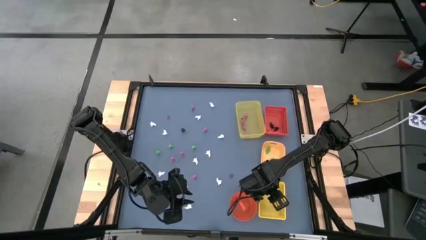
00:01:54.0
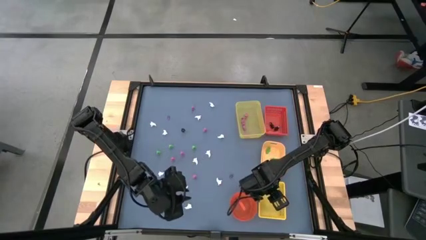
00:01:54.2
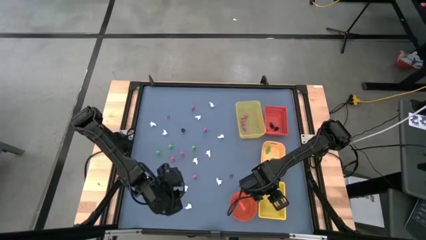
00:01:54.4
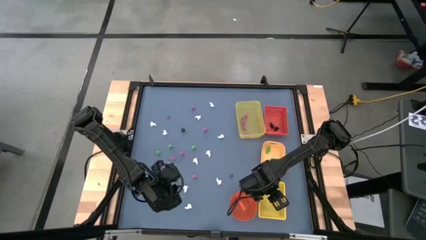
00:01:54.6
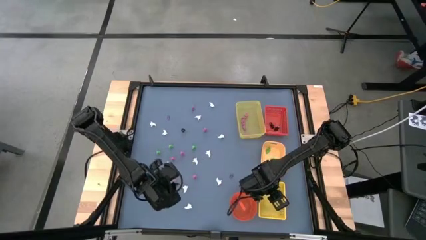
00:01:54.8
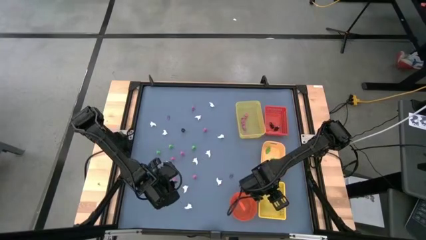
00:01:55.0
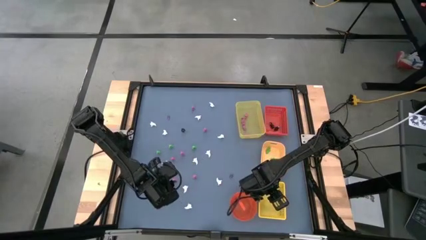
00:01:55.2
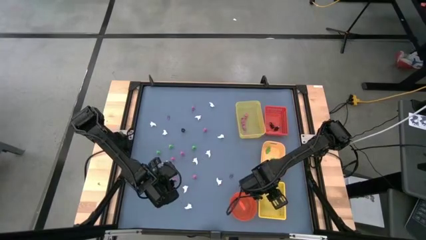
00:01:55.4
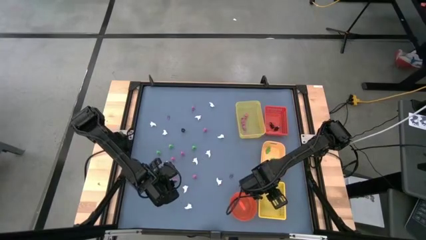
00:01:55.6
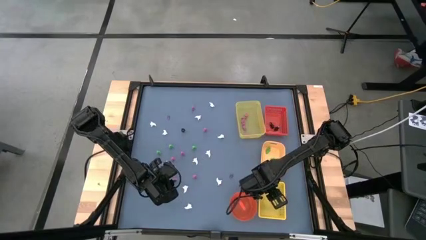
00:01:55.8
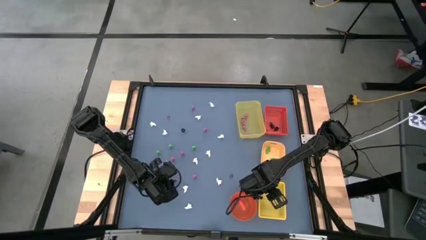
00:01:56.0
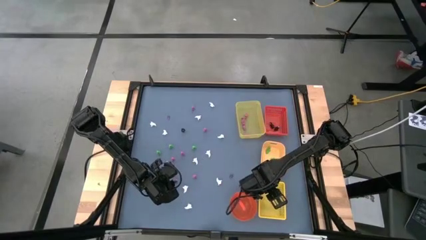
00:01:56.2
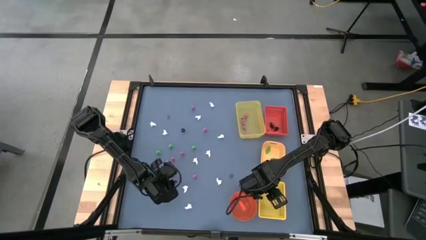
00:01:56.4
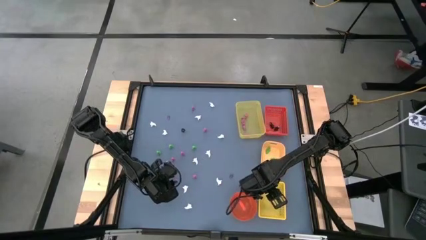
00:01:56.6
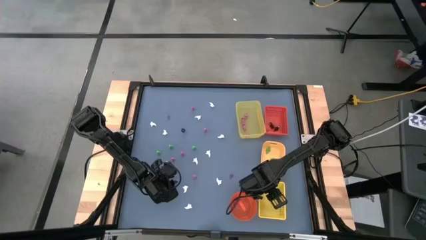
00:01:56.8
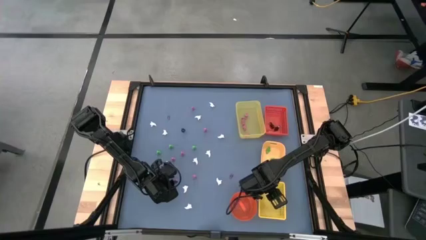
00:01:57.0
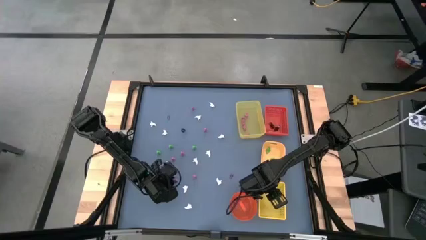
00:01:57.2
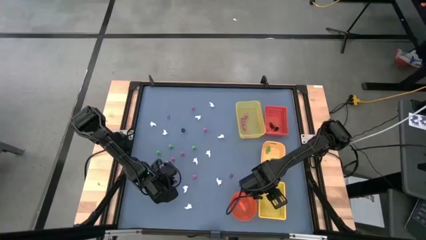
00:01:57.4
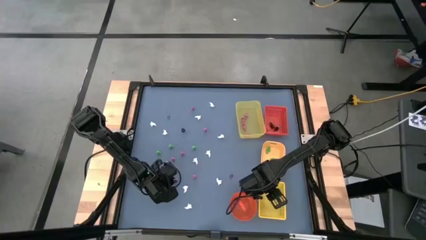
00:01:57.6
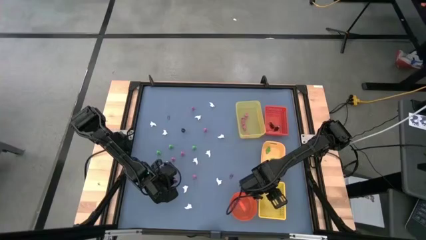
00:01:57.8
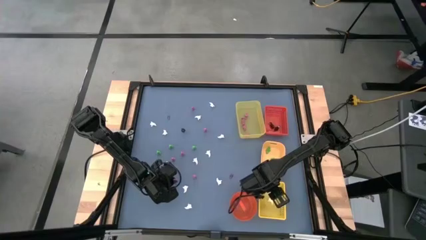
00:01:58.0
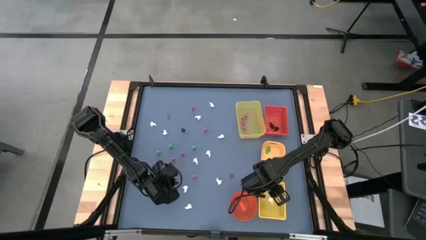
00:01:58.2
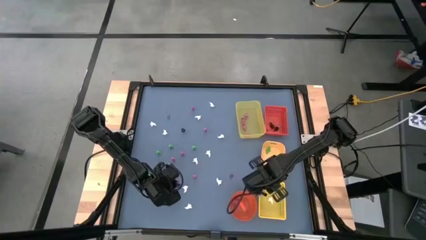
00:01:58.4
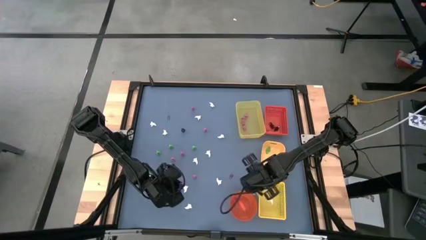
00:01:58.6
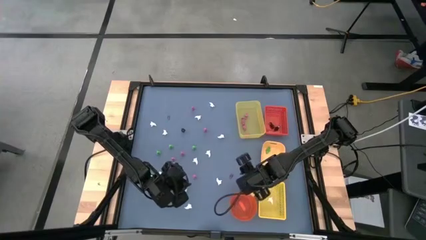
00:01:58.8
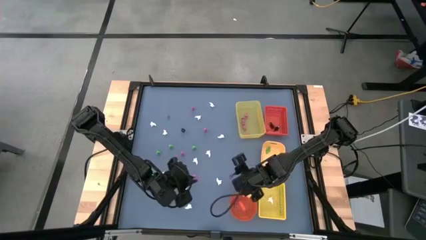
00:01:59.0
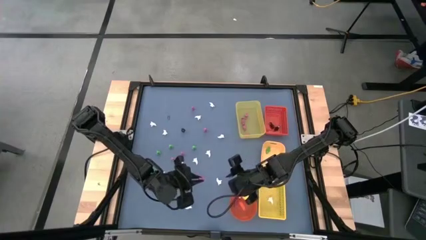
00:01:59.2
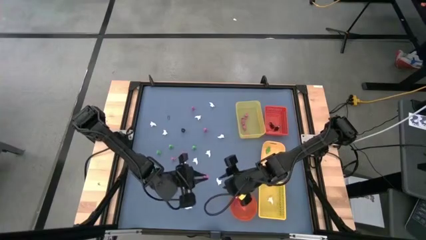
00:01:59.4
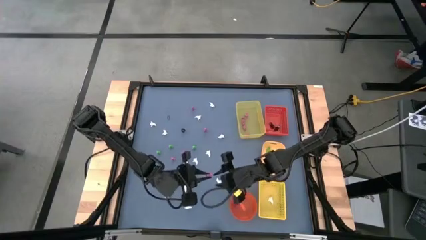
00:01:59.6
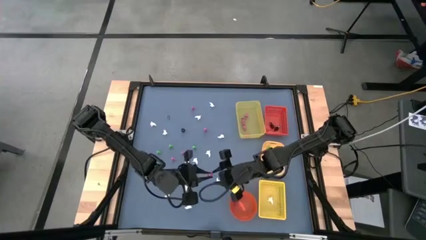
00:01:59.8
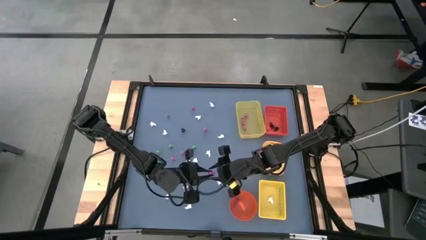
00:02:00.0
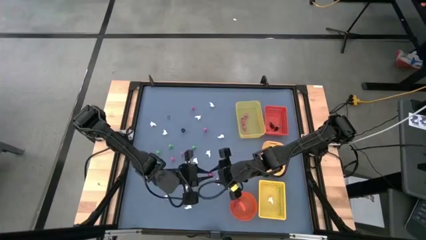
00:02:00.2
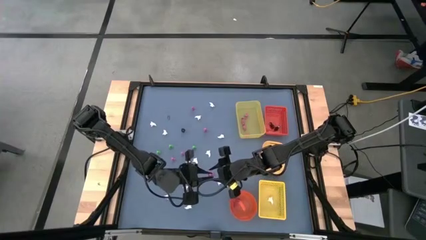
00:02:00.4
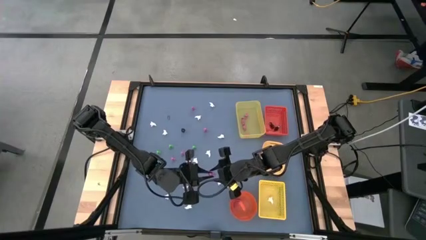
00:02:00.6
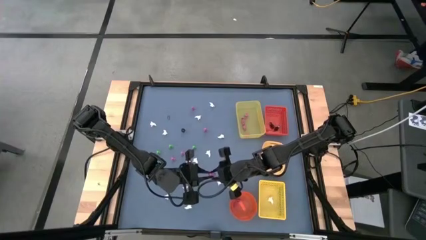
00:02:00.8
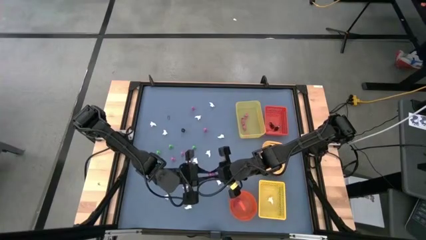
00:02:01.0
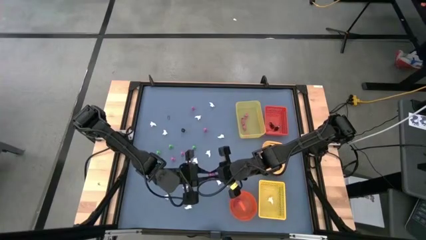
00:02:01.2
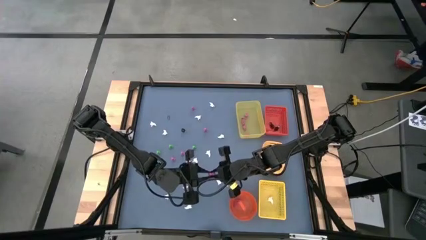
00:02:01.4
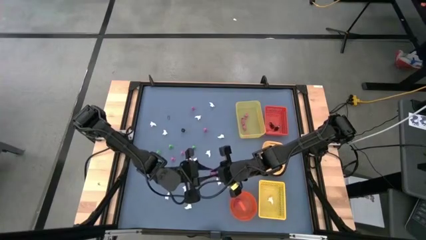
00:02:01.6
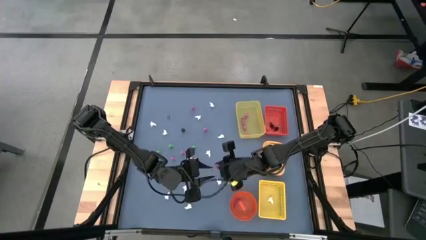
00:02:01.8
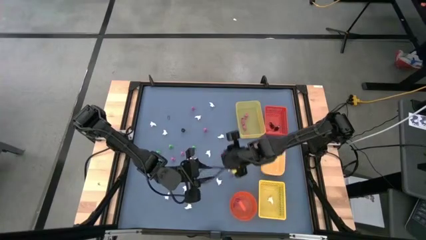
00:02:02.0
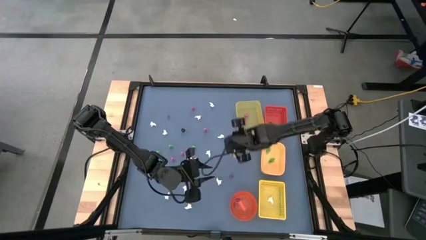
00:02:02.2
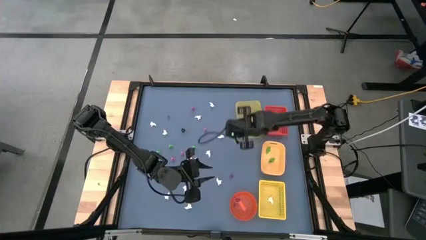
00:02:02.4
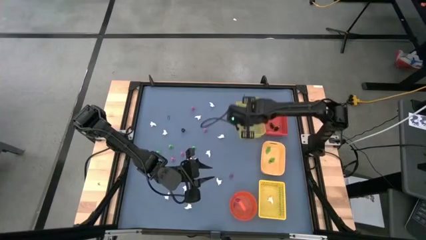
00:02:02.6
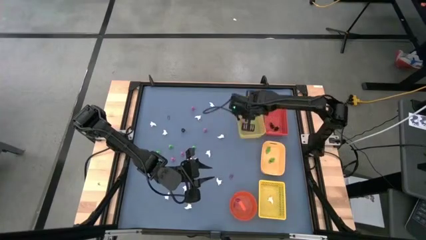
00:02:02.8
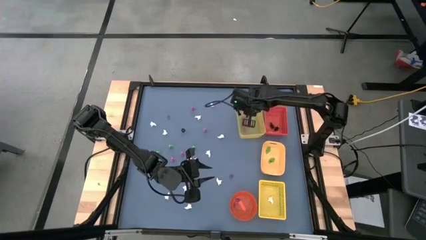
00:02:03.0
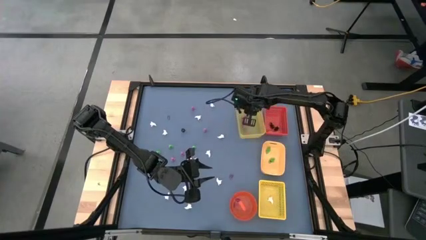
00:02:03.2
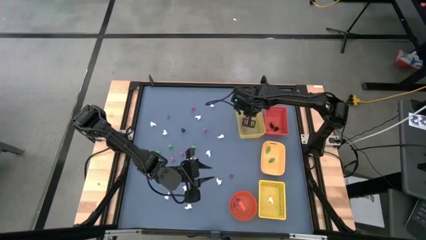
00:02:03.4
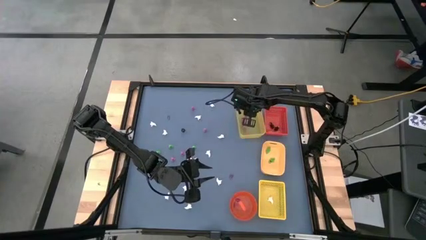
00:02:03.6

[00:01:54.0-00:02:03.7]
Task: Sort Halloween decoration
Put the pink skeleton toy into the top yellow bin
